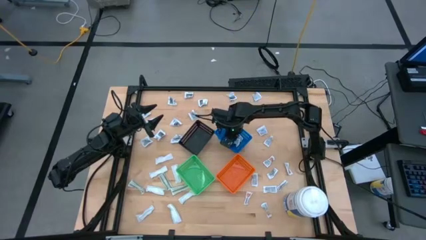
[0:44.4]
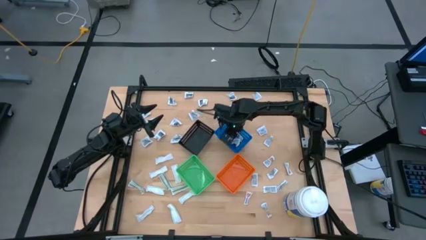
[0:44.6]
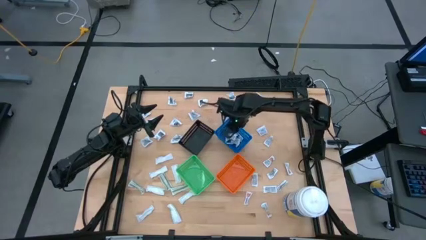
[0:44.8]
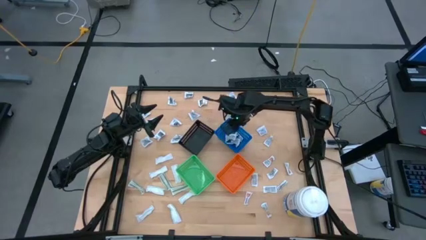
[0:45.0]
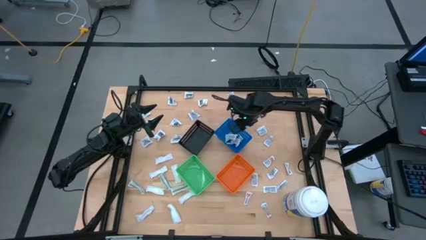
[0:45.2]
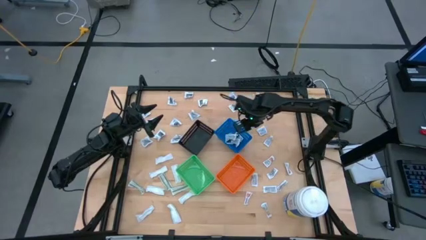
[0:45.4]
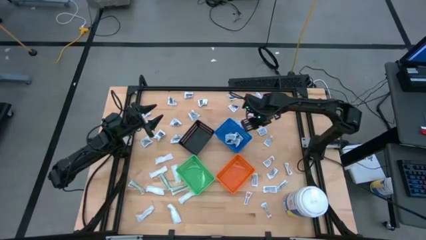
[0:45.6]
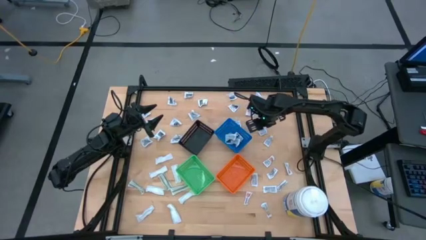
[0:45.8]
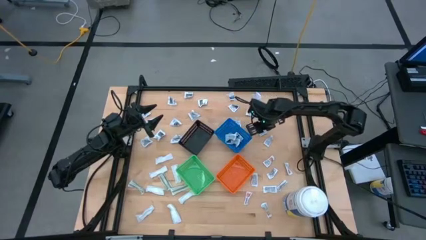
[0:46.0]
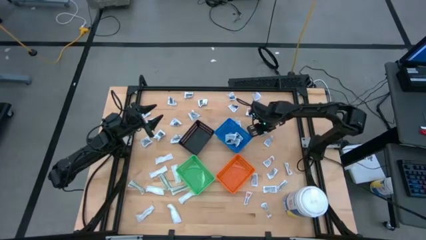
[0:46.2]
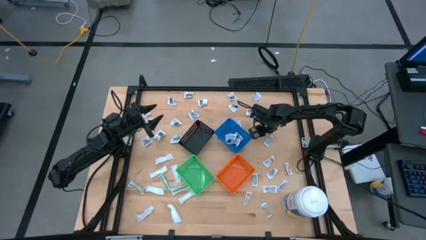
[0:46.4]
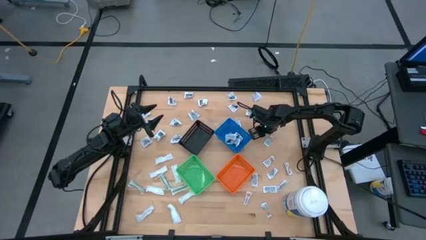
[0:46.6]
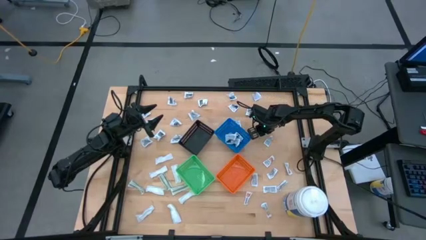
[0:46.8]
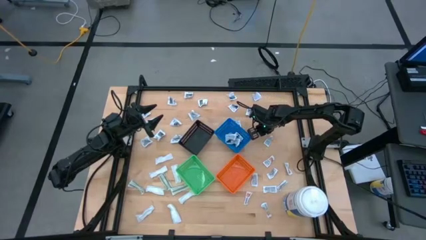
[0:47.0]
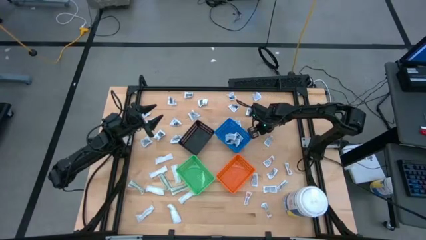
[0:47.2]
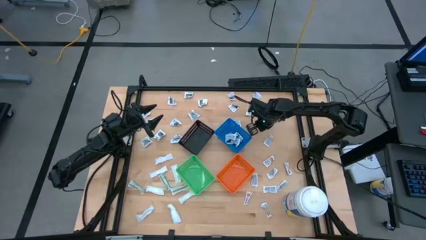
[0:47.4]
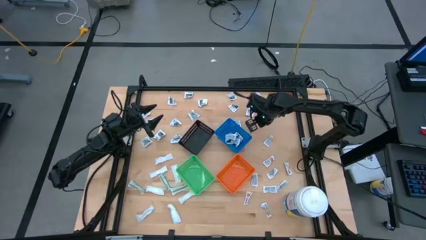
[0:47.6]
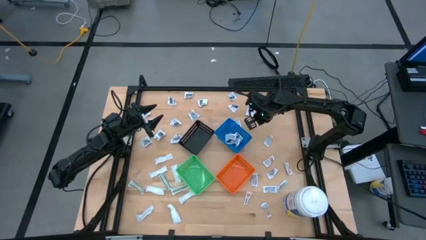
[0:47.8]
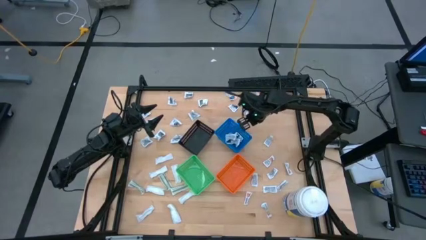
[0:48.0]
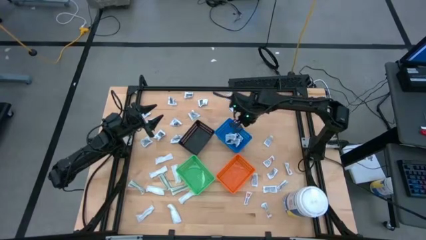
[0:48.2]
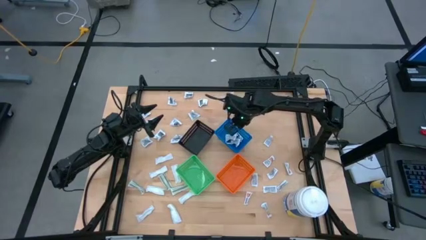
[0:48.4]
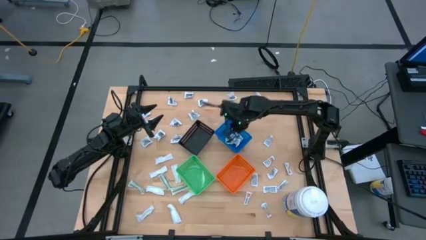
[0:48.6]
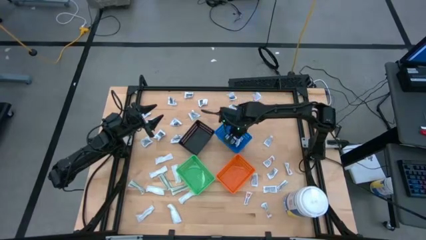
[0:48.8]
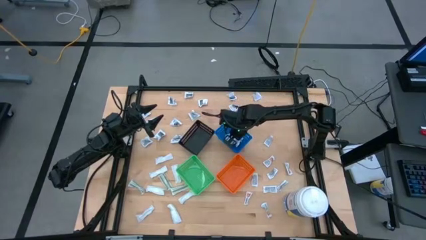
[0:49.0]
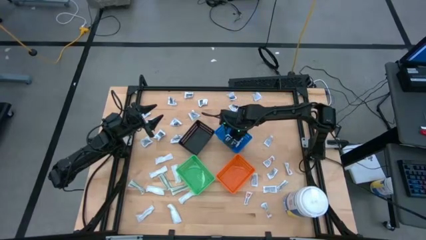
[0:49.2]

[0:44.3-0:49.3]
Task: Pick & Place First Aid Supplies
Put the blue alcohol pad into the blue bin

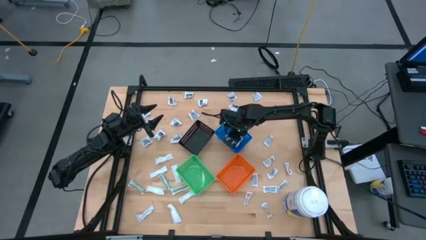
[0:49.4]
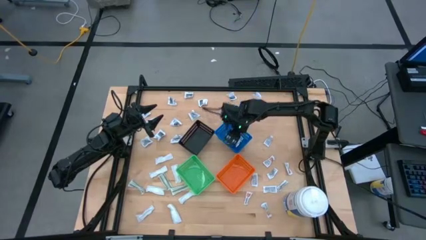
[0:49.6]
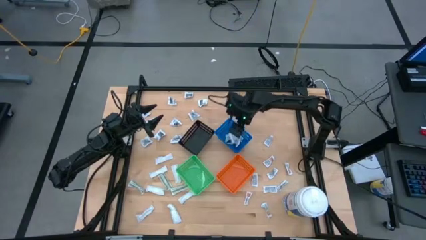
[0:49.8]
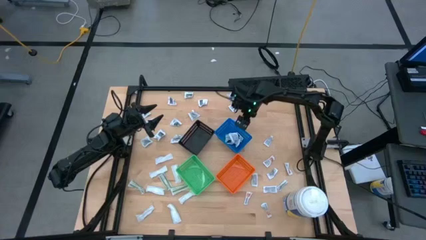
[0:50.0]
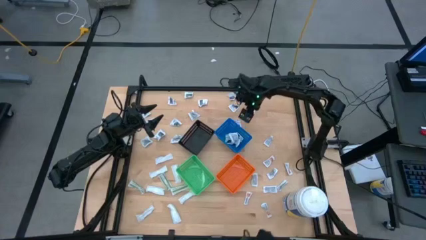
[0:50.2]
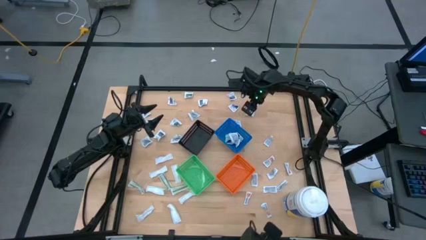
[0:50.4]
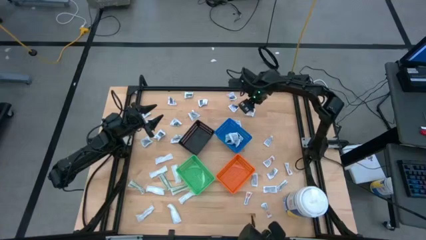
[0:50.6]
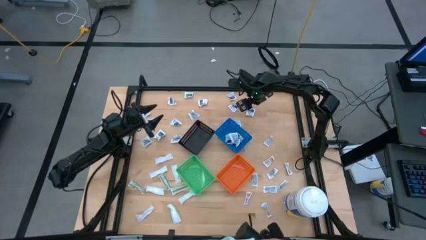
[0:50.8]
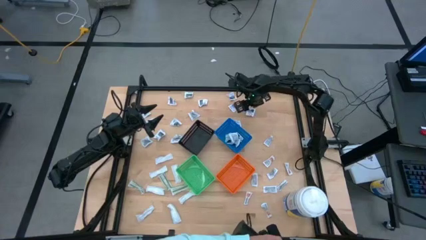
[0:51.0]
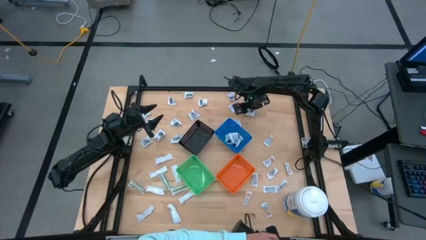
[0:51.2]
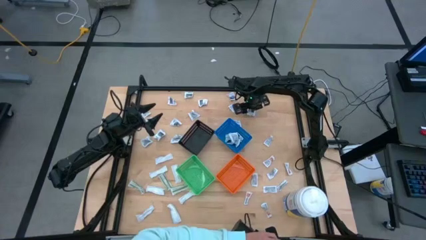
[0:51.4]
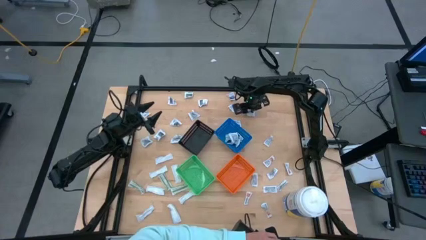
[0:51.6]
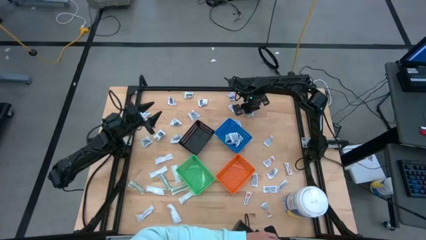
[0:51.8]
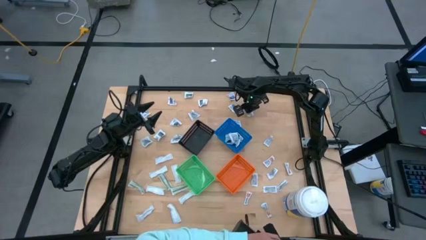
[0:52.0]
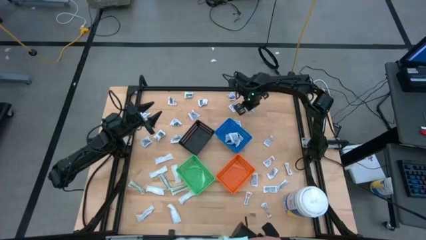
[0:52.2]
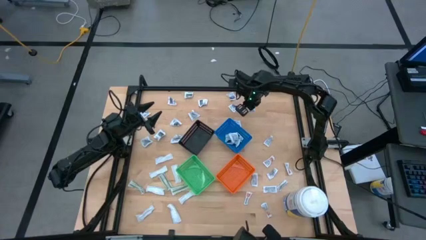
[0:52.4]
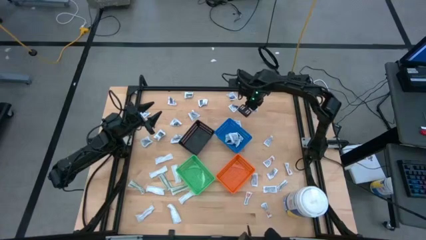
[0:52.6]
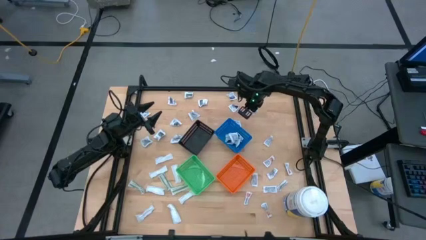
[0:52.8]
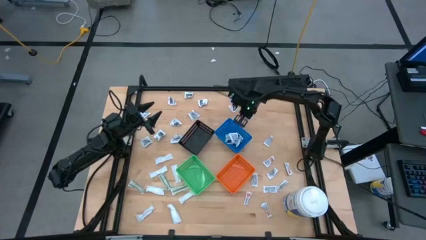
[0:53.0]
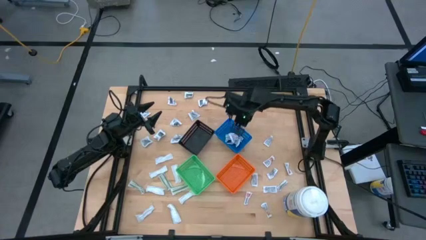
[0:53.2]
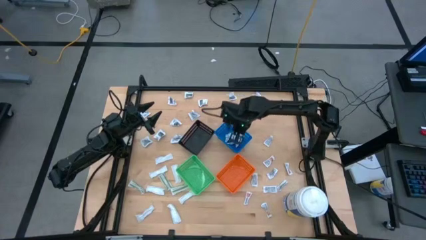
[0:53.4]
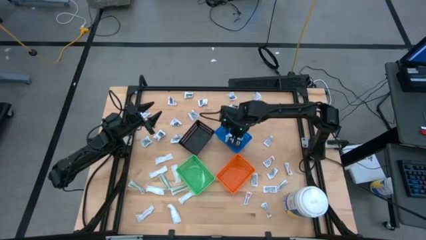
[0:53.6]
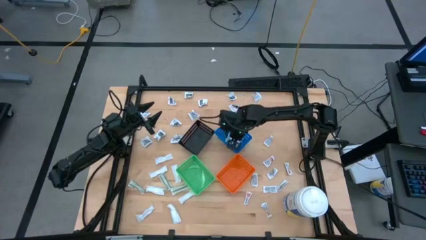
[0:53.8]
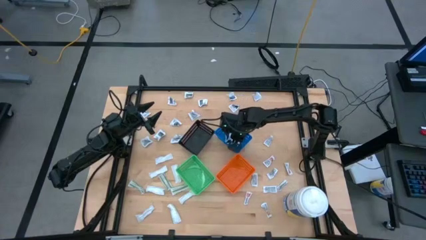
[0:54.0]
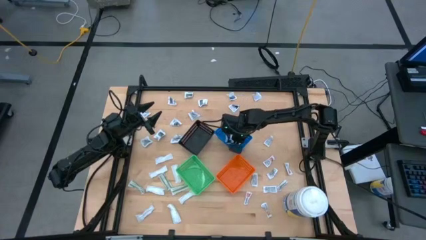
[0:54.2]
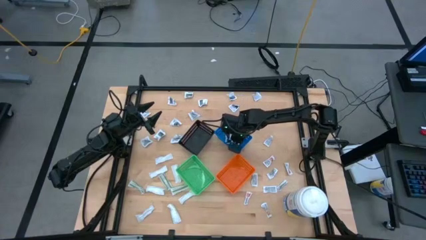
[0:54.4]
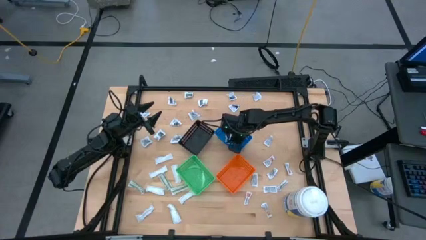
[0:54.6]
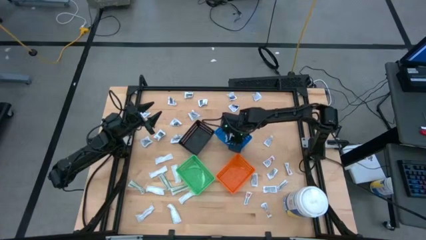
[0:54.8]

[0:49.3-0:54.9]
Put the blue alcohol pad into the blue bin

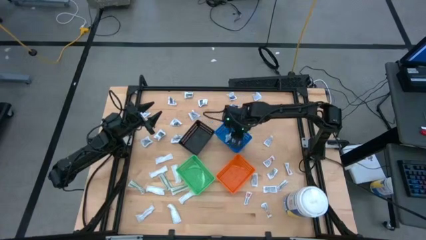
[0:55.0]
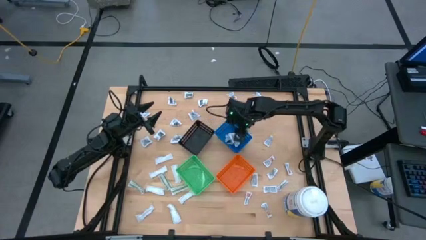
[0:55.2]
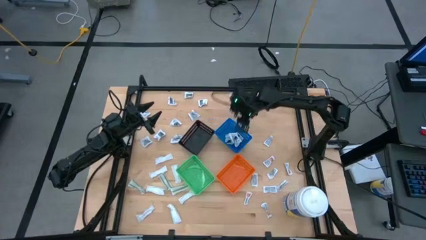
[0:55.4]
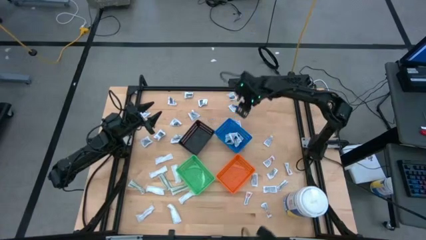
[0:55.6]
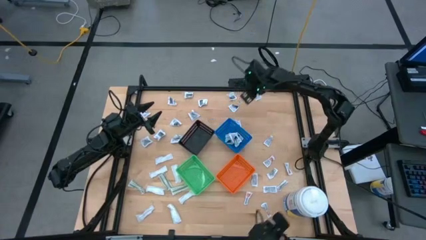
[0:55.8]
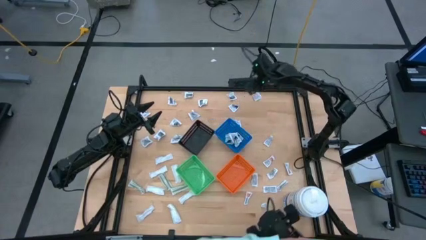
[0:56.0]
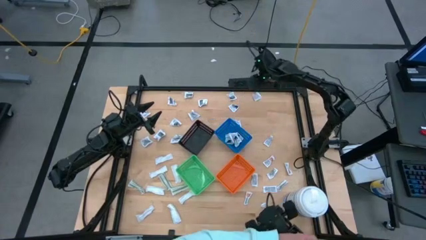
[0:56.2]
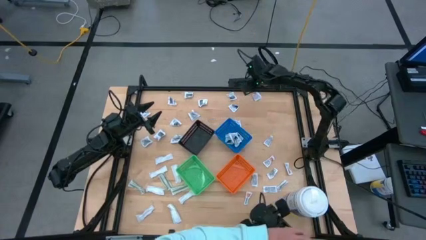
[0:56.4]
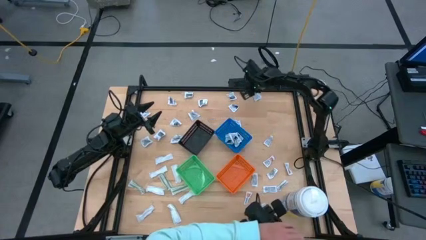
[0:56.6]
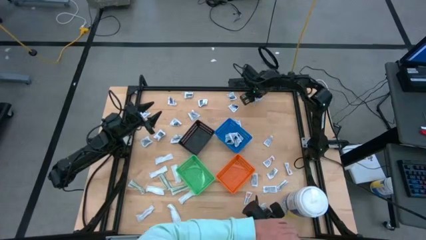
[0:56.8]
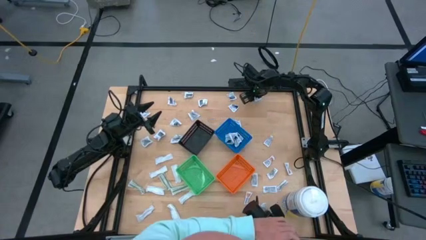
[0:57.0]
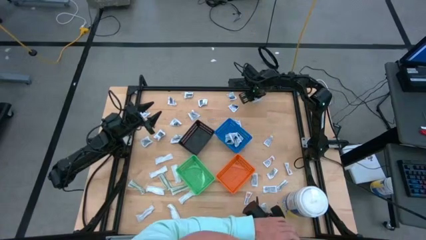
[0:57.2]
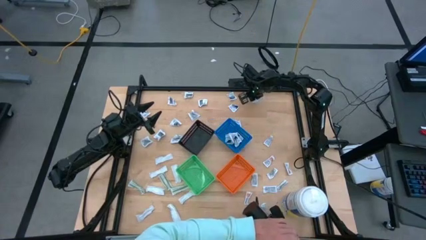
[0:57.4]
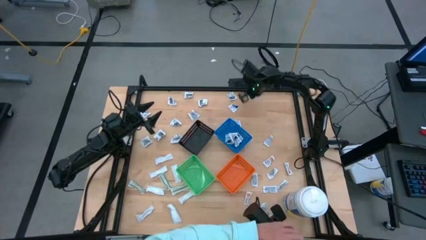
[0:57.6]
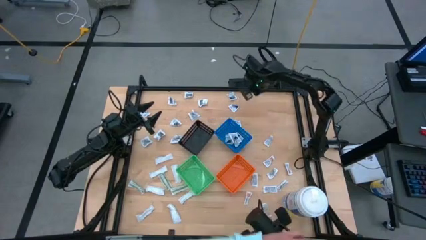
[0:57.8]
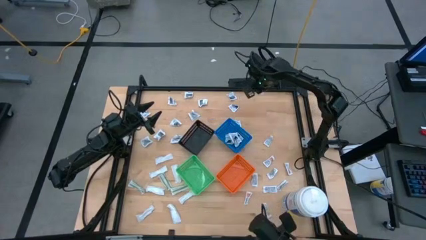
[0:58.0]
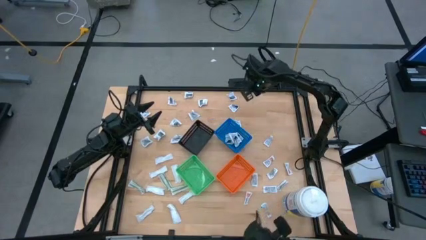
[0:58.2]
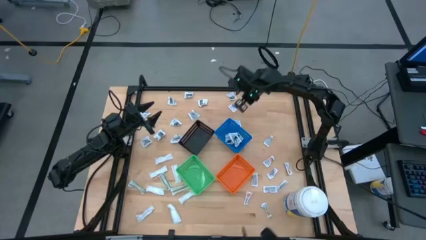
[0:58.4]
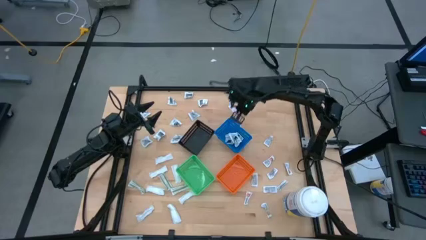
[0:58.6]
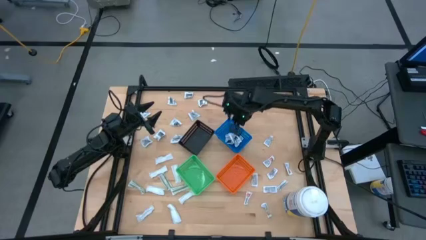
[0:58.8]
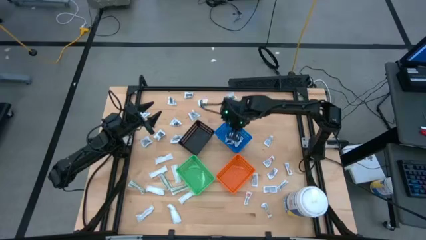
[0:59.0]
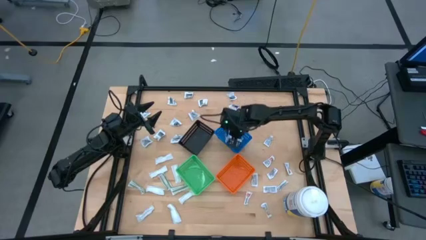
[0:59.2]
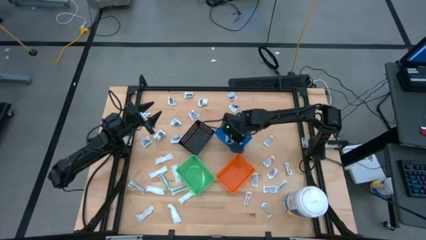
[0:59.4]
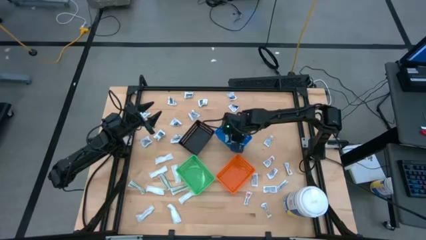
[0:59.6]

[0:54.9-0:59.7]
Put the blue alcohol pad into the blue bin

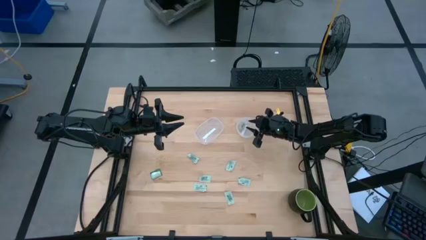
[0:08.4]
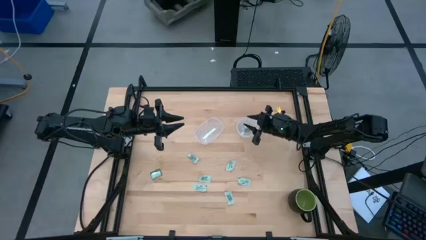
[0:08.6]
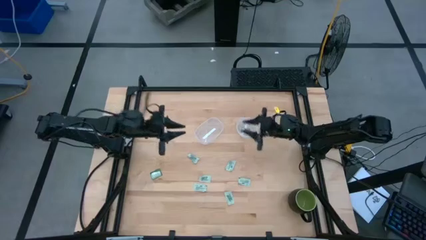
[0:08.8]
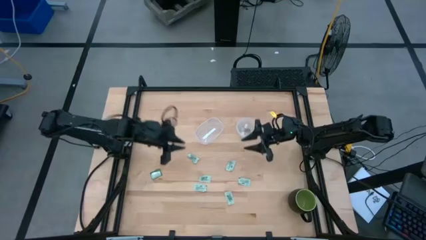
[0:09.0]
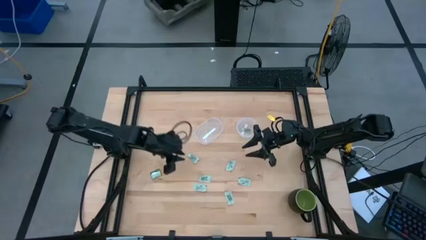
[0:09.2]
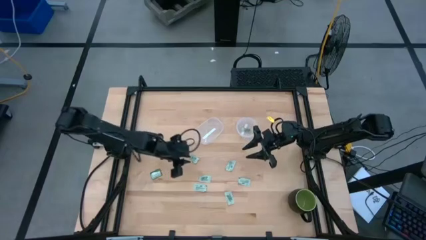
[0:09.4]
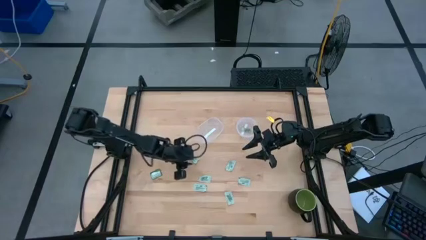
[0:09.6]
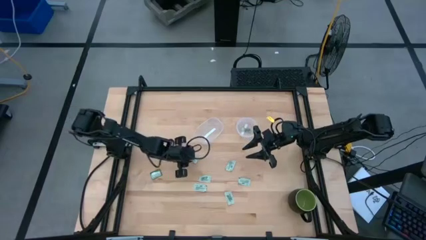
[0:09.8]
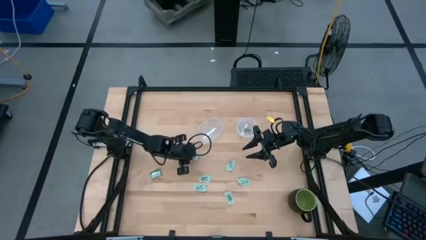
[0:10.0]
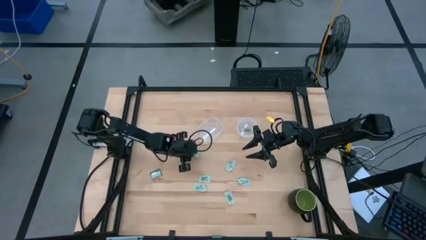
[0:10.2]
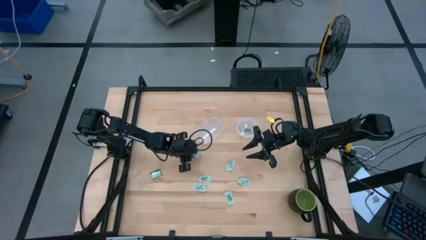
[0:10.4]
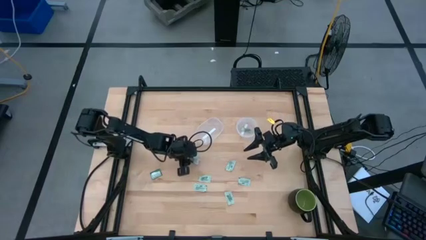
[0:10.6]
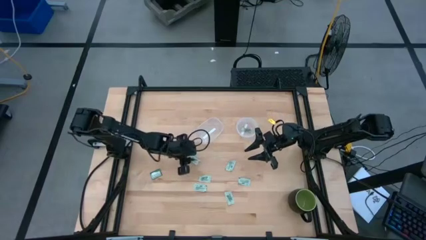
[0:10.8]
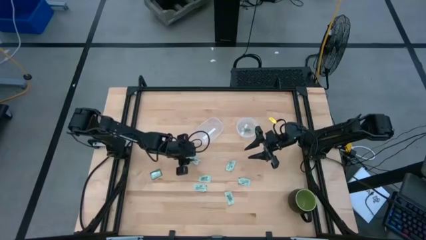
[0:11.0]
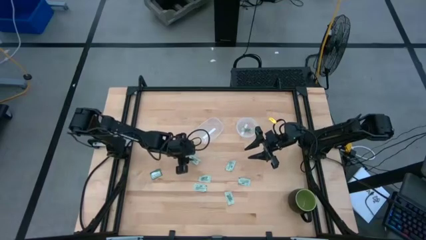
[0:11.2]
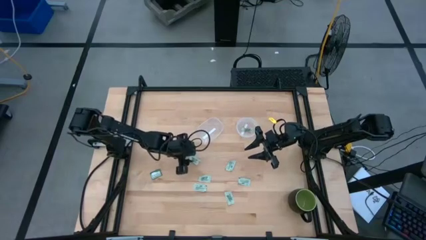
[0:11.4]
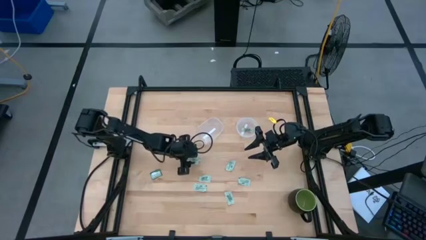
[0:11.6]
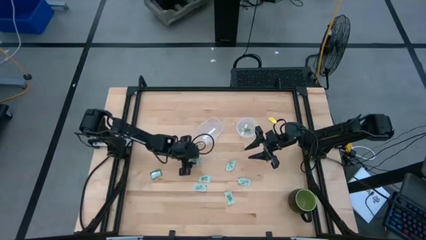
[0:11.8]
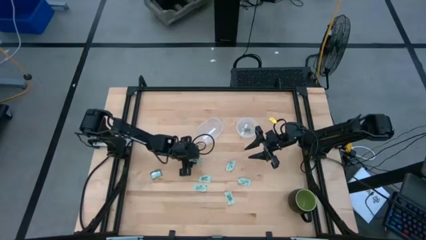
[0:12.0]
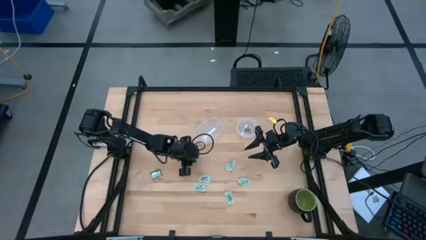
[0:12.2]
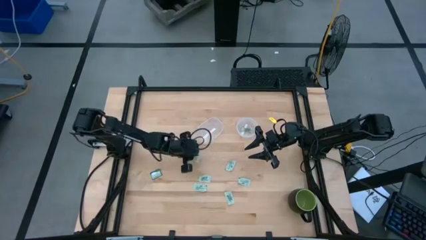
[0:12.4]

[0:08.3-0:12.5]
Task: Pick and place Stevia / Truvia into bins
Put the stevia packet into the left transparent container
